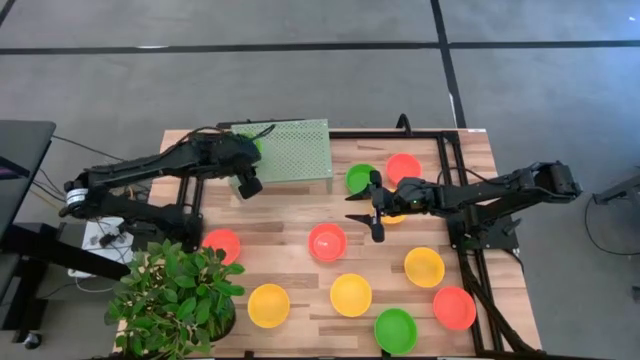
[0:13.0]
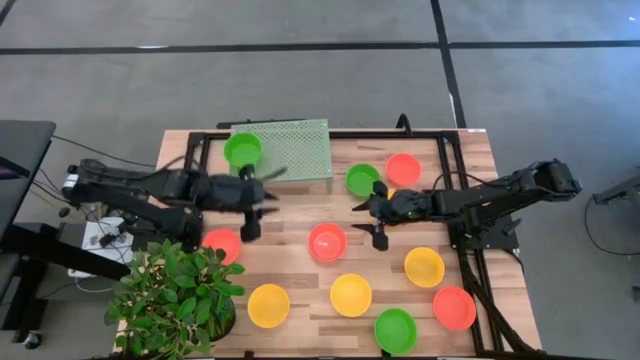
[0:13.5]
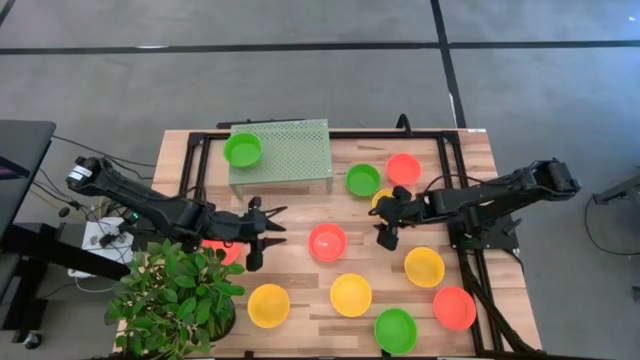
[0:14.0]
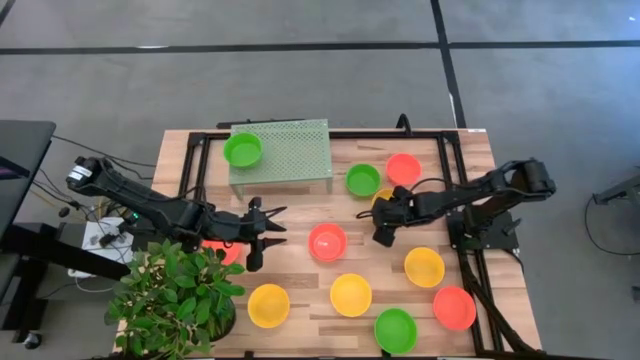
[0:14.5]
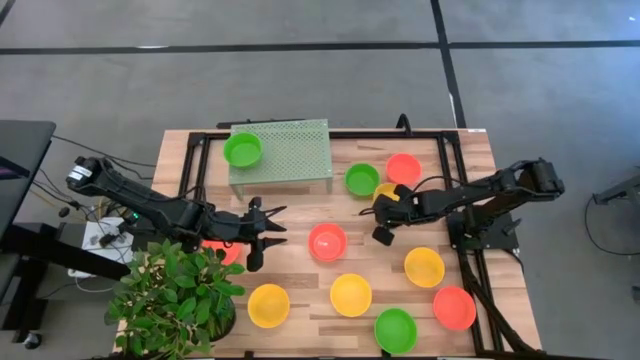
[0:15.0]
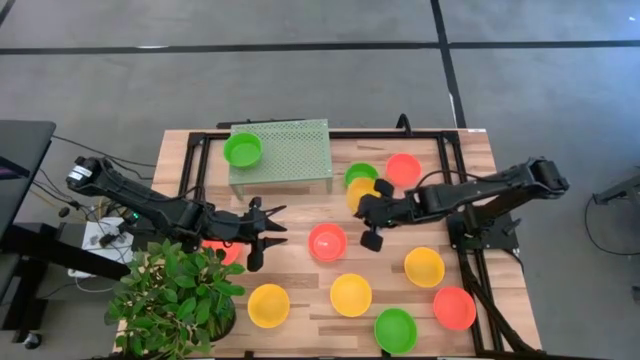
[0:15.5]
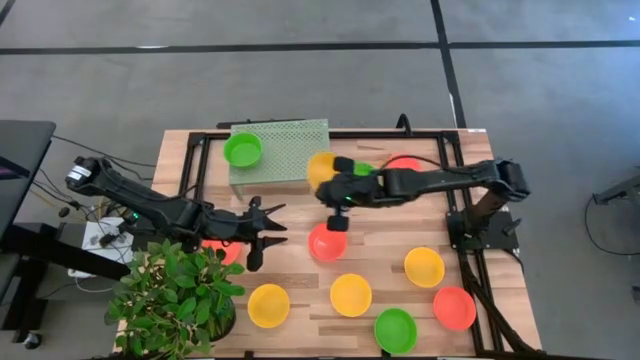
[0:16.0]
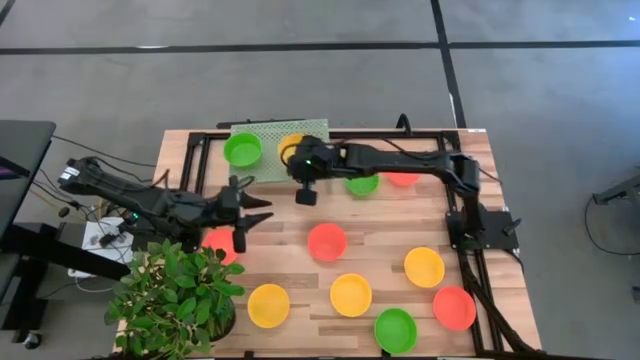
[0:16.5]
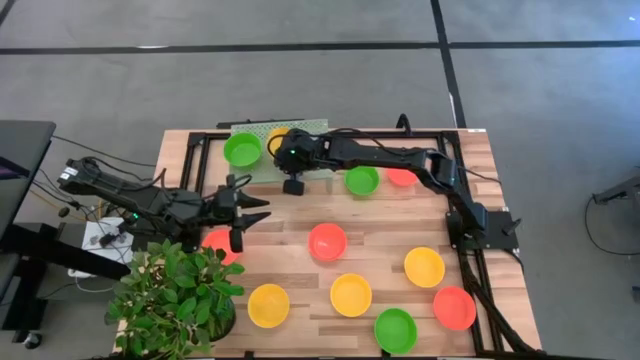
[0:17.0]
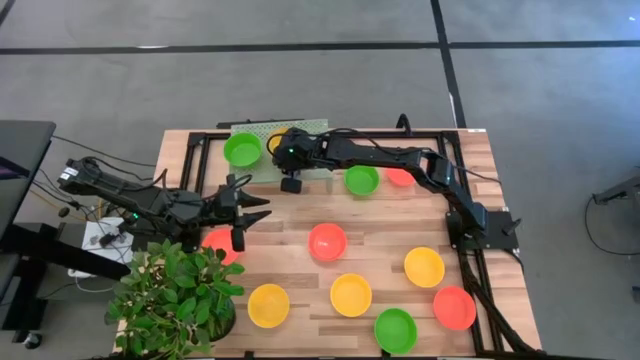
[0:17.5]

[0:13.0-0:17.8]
Task: Pick & Place Mini bowls
Put the yellow bowl on the shelf

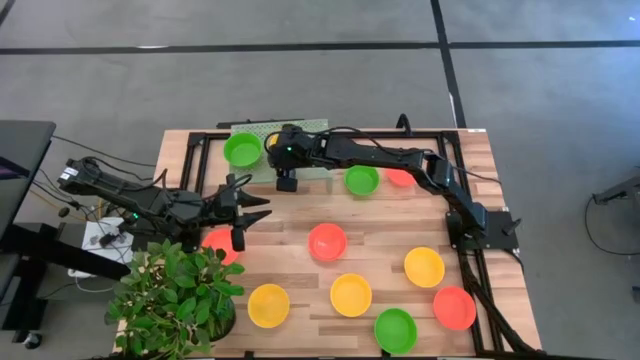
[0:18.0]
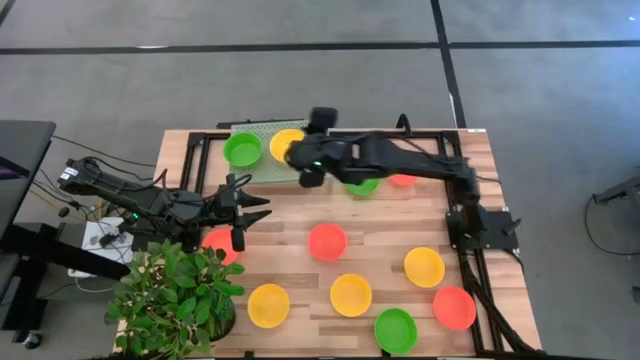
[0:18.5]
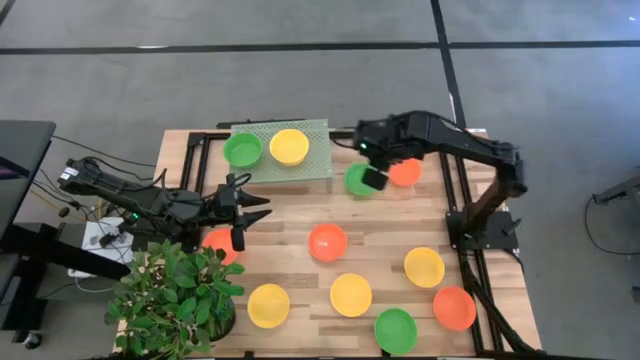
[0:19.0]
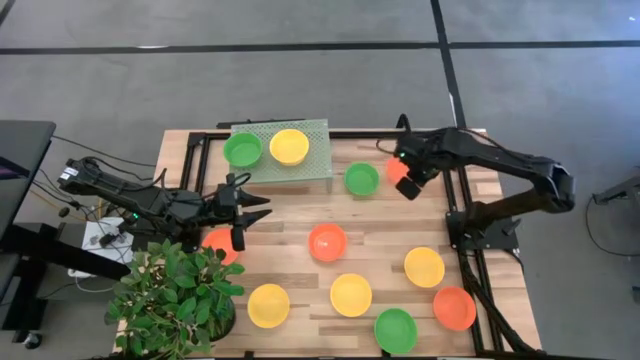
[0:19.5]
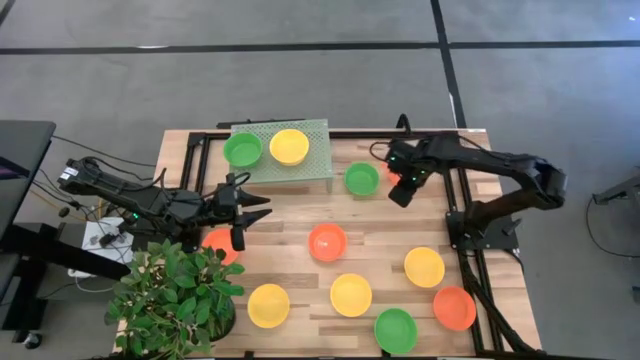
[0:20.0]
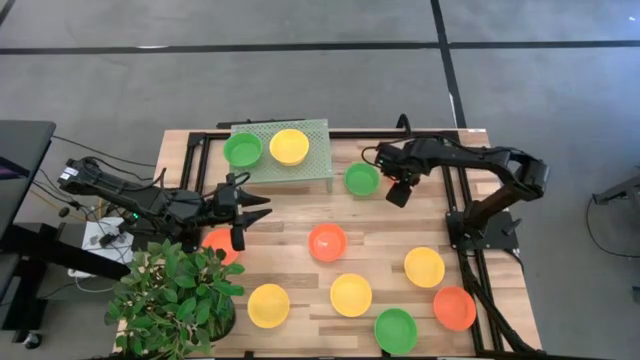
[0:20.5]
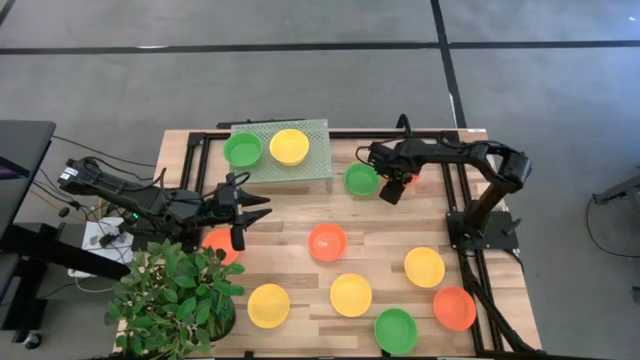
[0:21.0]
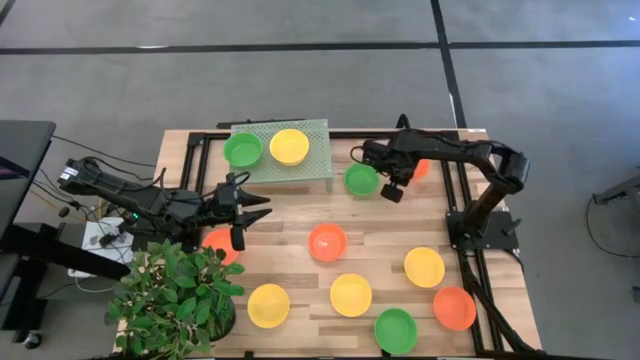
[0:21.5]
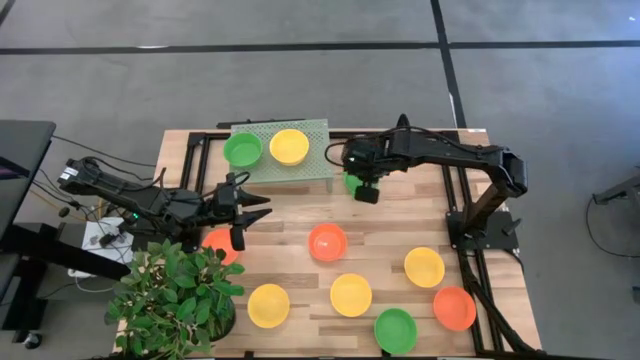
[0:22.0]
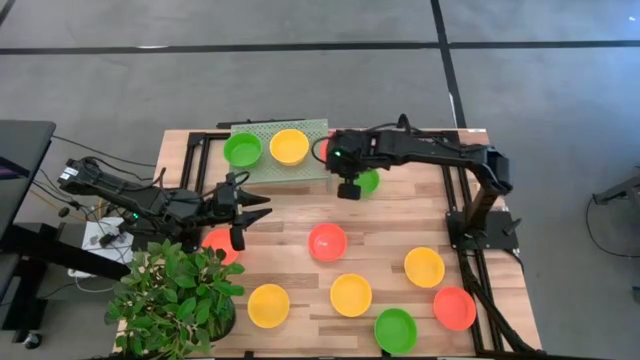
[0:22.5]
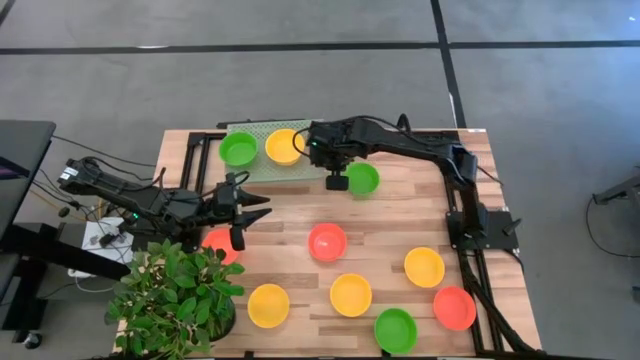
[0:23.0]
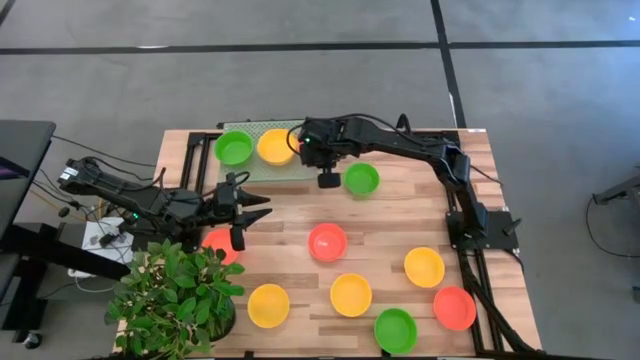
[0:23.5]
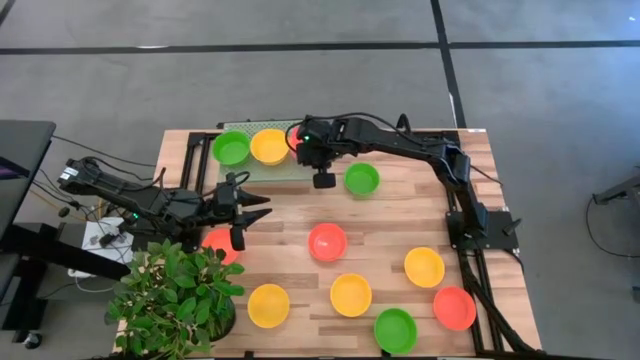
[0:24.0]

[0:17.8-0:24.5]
Put the orange bowl on the shelf

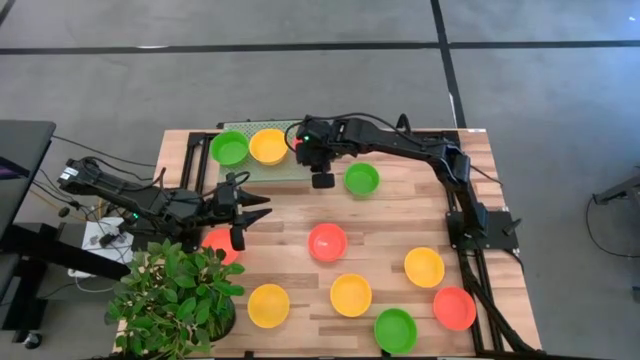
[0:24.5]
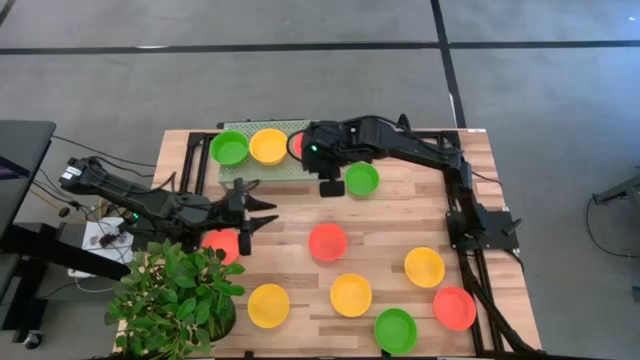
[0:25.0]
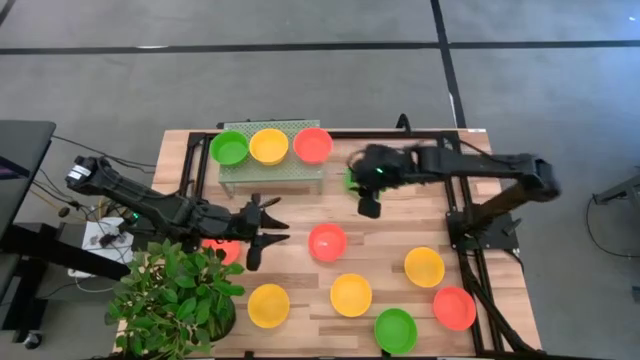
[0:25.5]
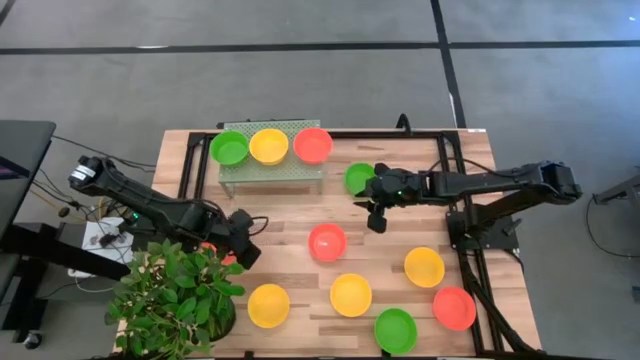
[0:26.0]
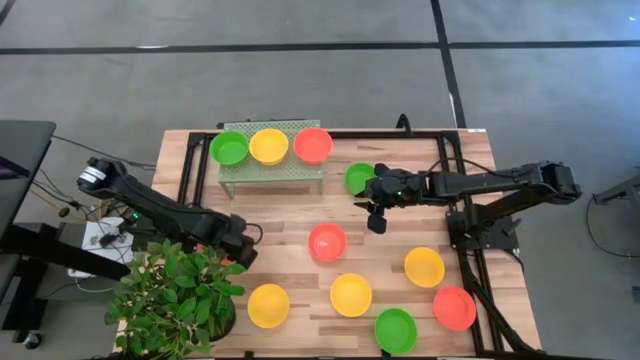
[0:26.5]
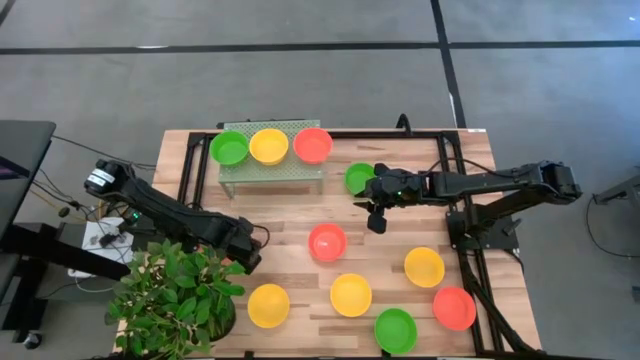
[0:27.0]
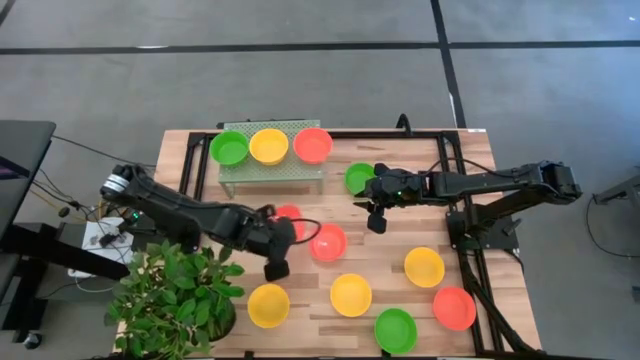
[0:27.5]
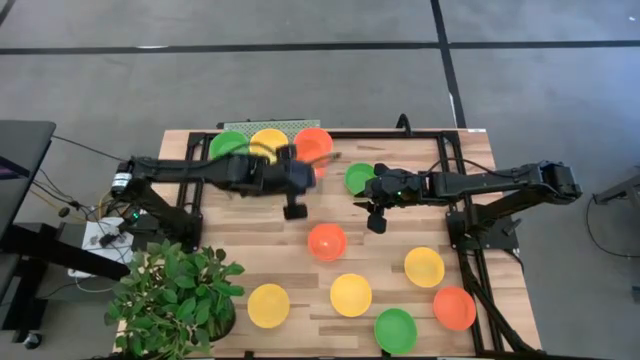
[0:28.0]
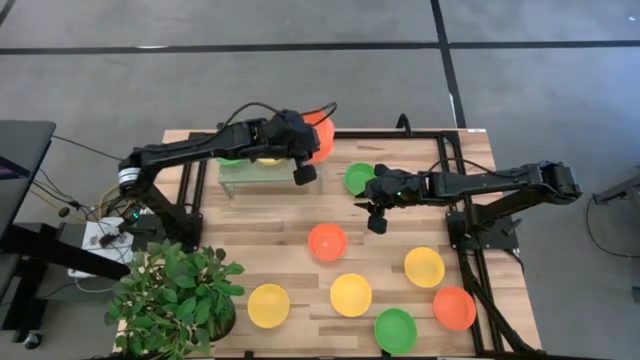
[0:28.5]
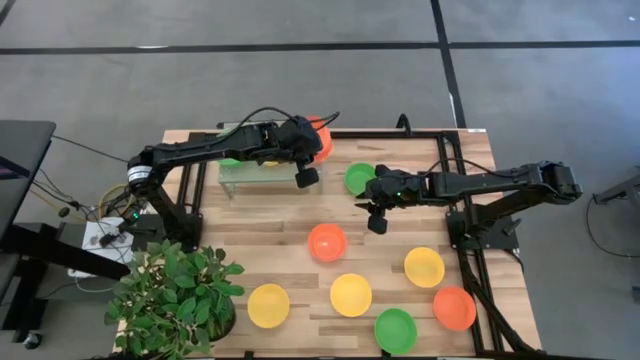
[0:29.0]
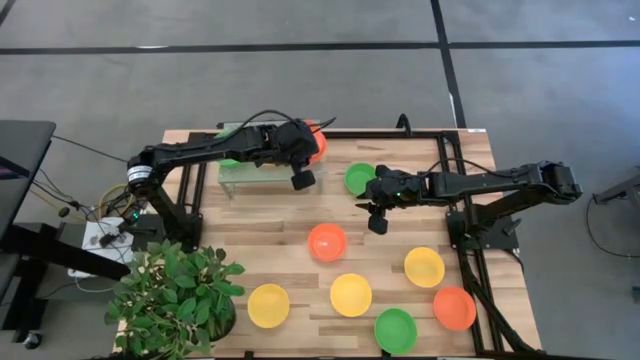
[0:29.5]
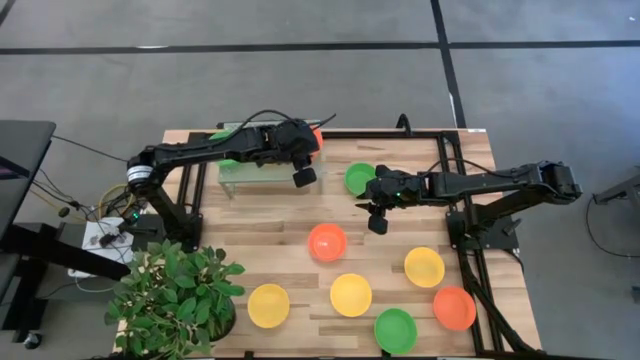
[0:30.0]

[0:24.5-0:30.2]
Stack the orange bowl on top of the orange bowl on the shelf

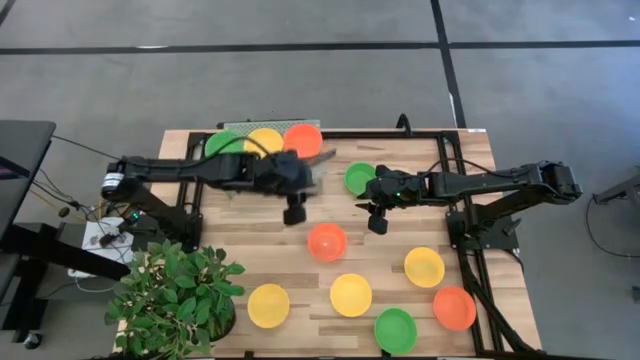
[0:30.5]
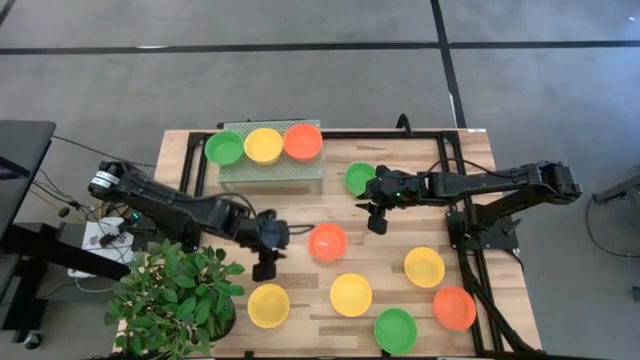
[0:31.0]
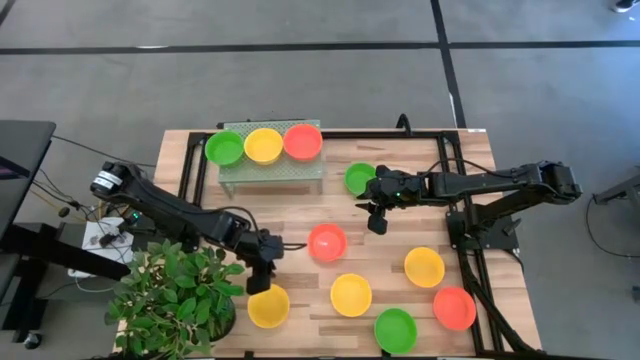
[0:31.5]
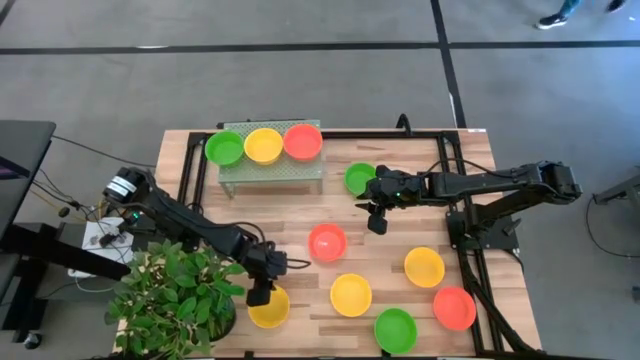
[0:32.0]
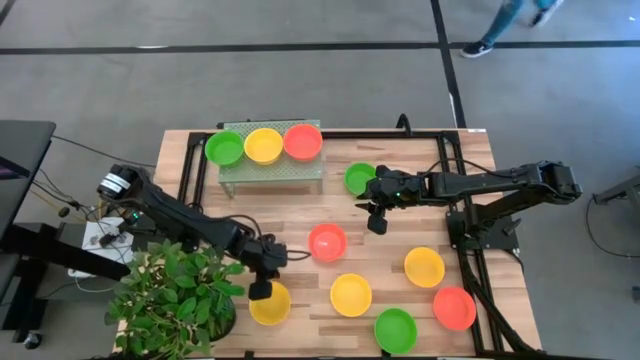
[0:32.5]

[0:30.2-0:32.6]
Stack the yellow bowl on top of the yellow bowl on the shelf

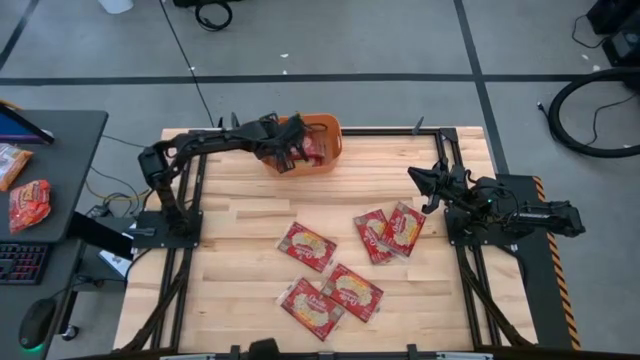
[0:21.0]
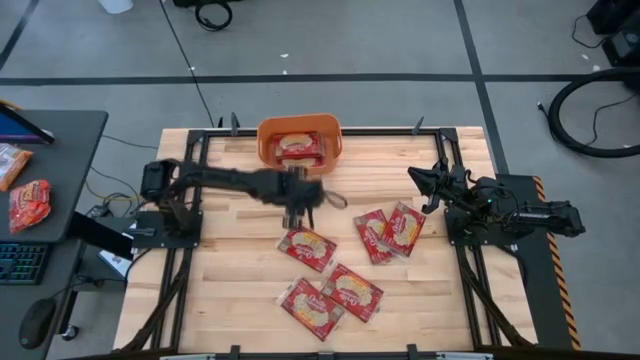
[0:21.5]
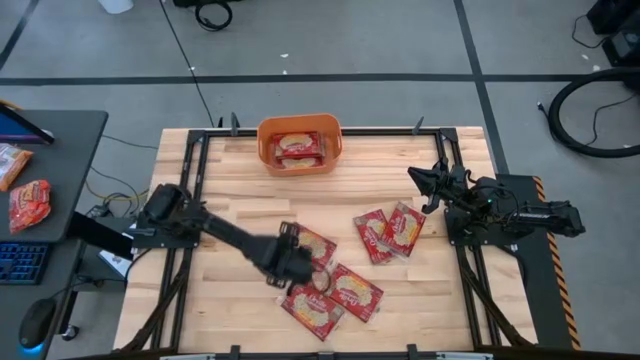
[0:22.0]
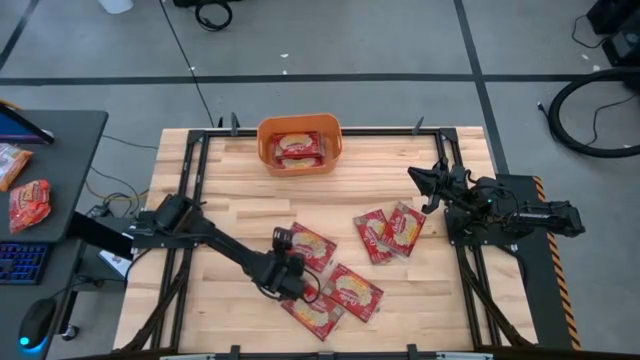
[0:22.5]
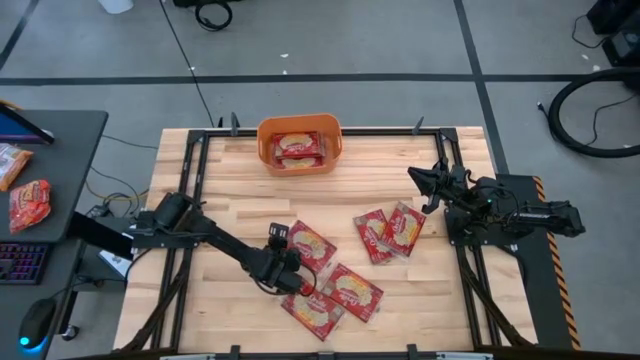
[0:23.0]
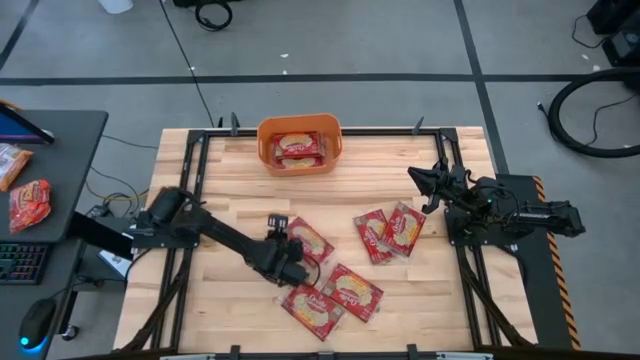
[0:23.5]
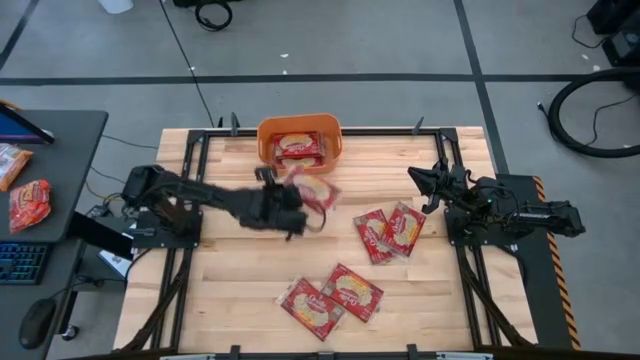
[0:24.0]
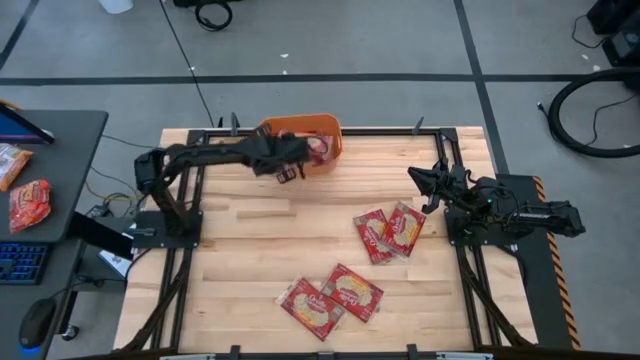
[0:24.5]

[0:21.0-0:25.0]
Task: Sort popcorn bags into baskets
Put the red popcorn bag into the orange bin
